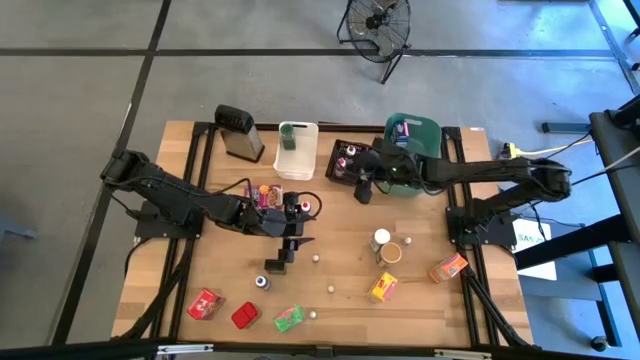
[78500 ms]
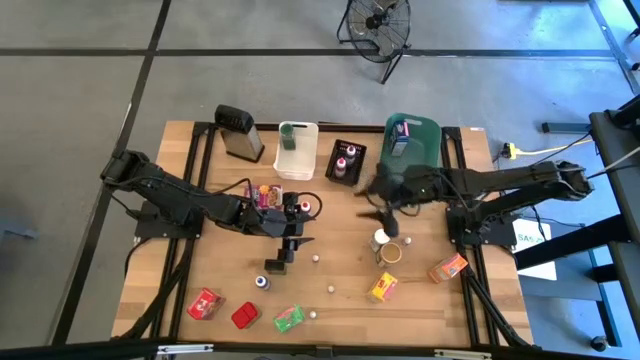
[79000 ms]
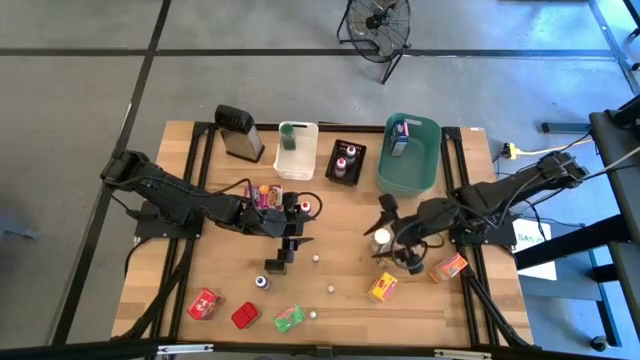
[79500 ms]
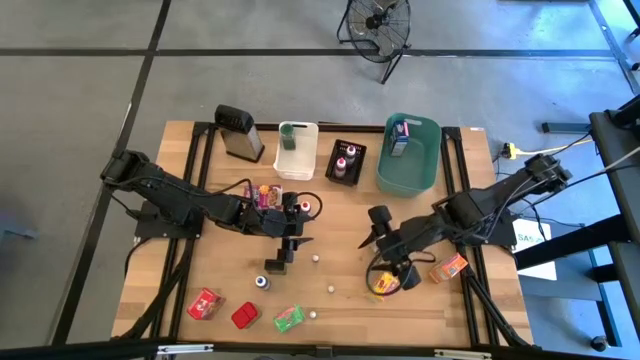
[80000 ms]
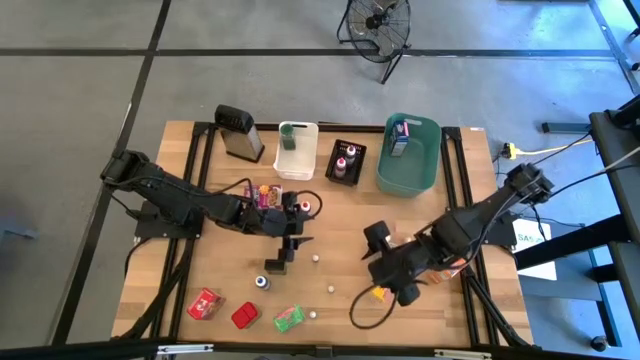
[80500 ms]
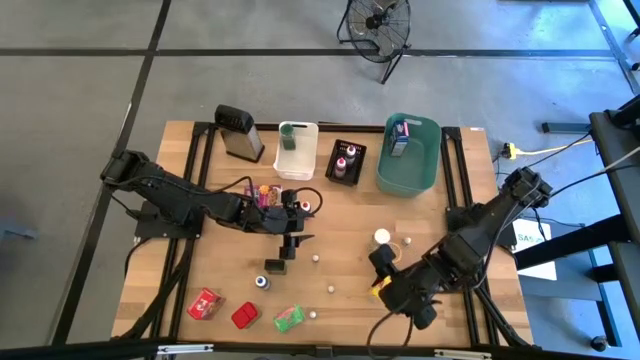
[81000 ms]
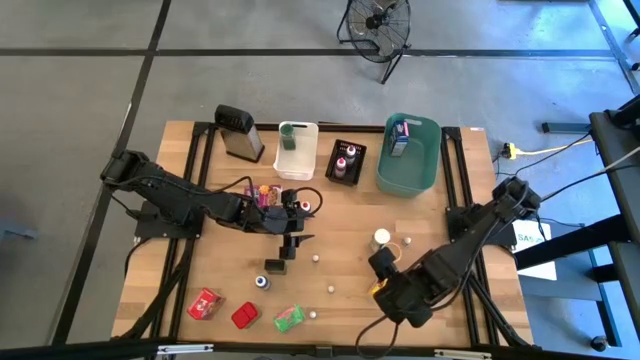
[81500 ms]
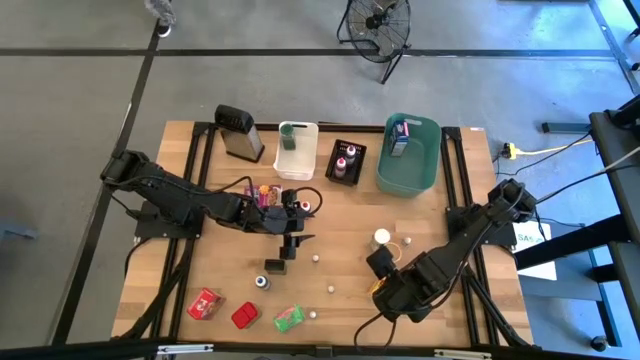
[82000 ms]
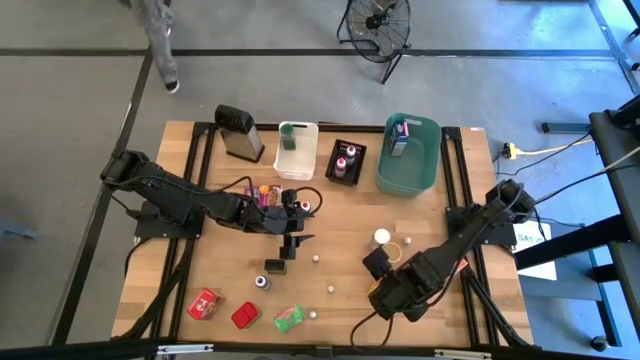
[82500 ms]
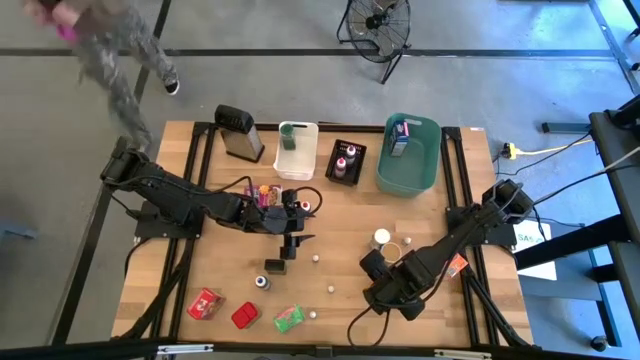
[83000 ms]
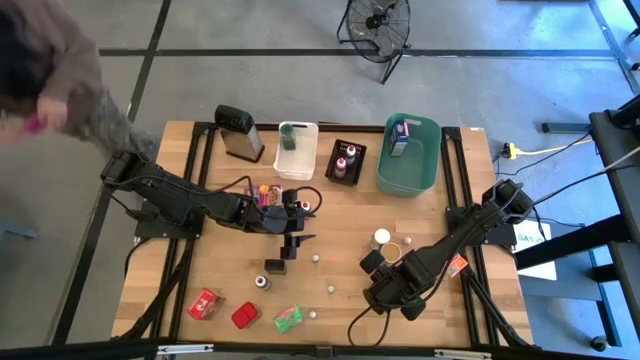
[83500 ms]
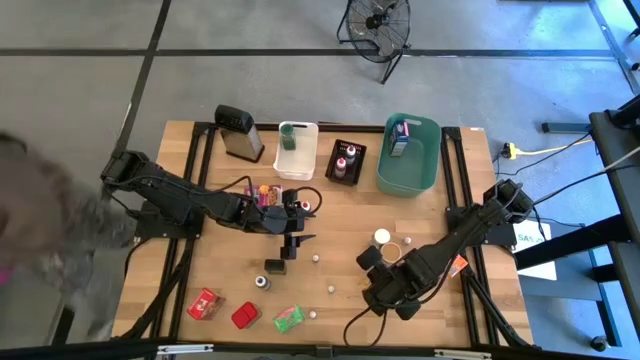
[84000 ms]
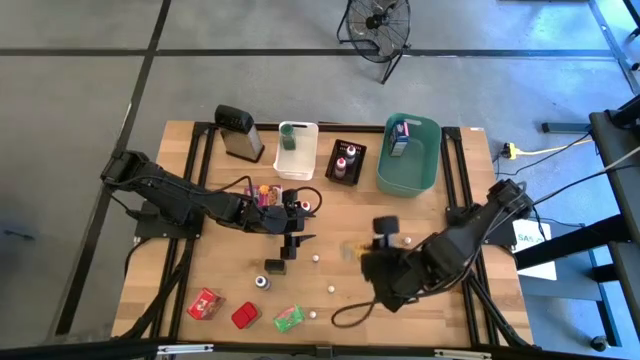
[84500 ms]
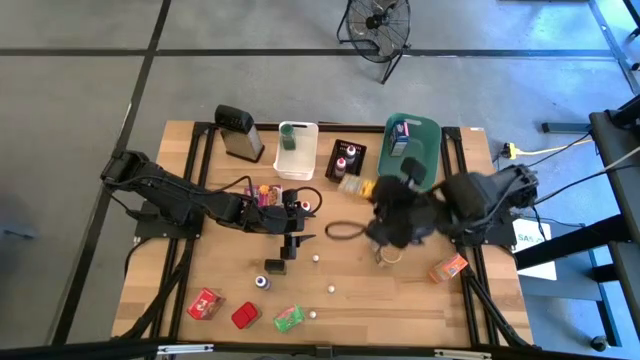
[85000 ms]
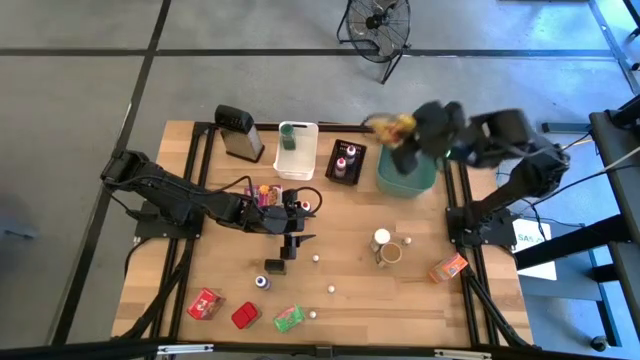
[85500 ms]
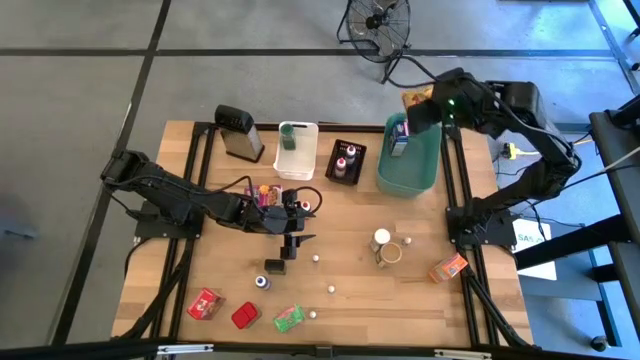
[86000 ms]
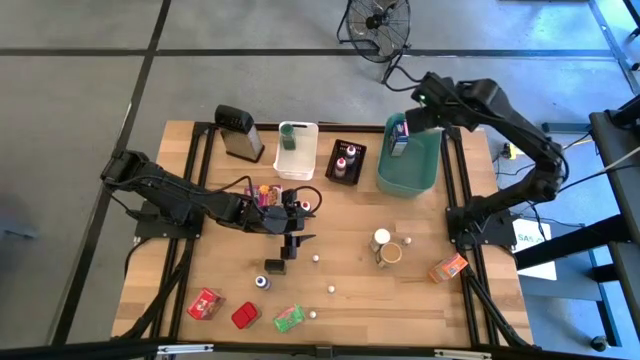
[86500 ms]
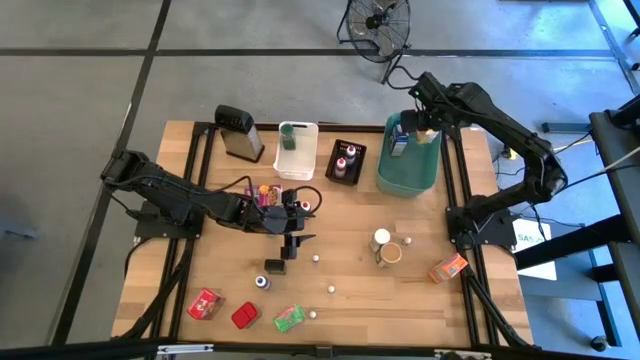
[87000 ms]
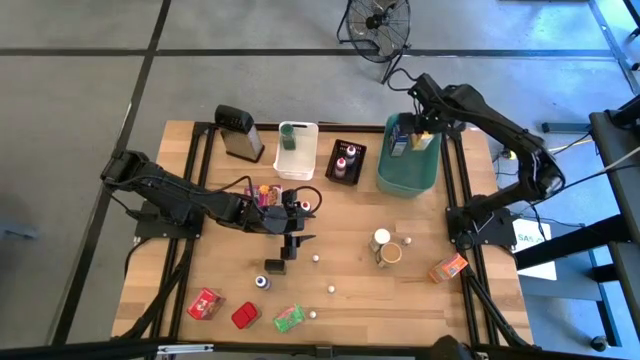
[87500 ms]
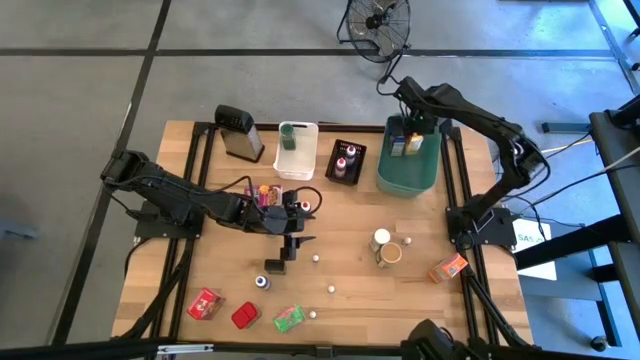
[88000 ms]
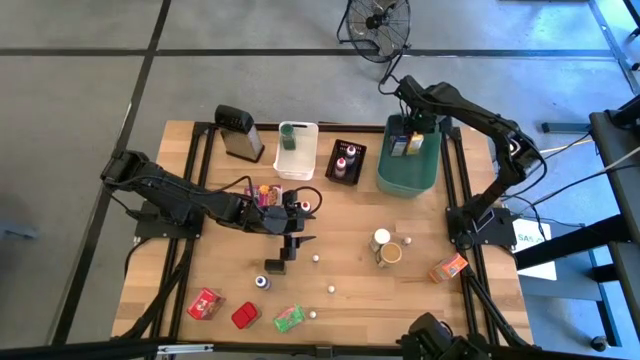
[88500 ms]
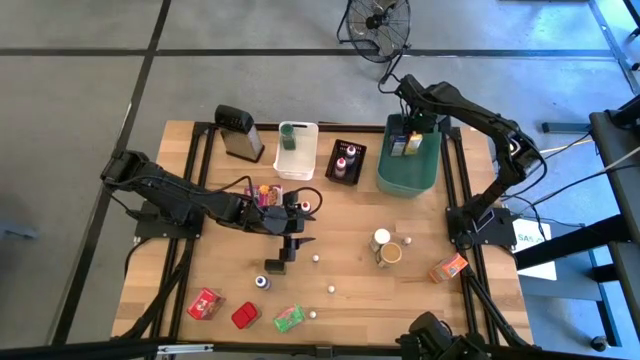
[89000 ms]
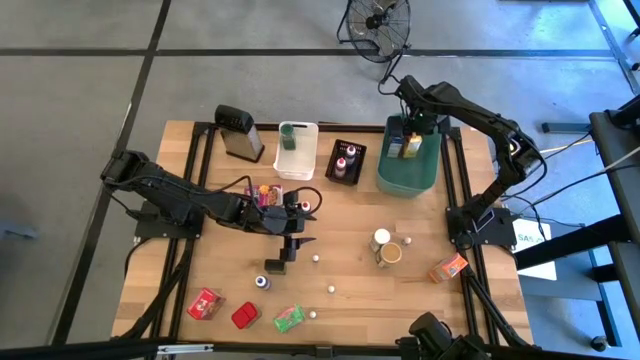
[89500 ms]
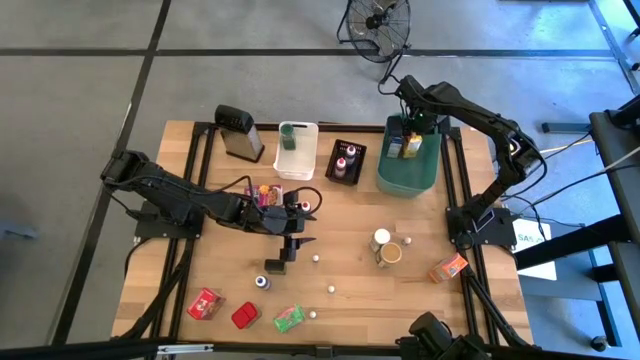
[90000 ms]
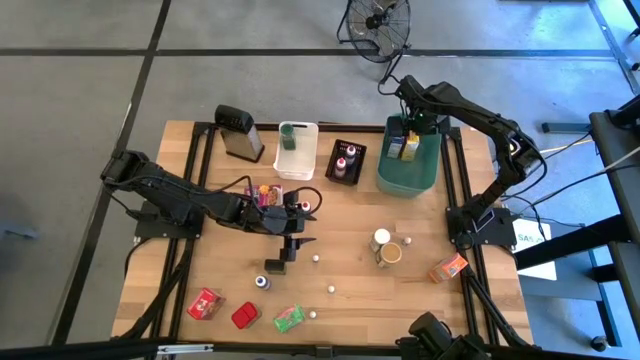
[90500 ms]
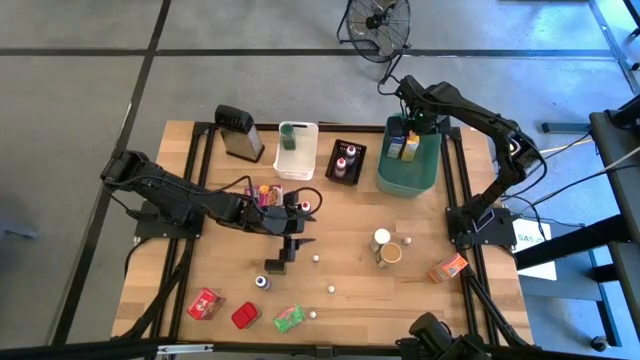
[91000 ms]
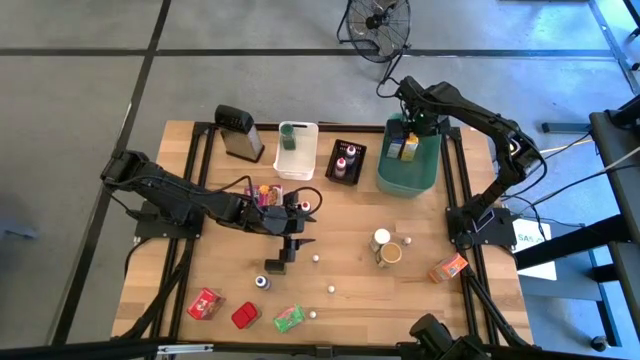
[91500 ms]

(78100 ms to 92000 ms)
Task: Pick & Place Kitchen Items
Put the yellow cereal box into the green bin

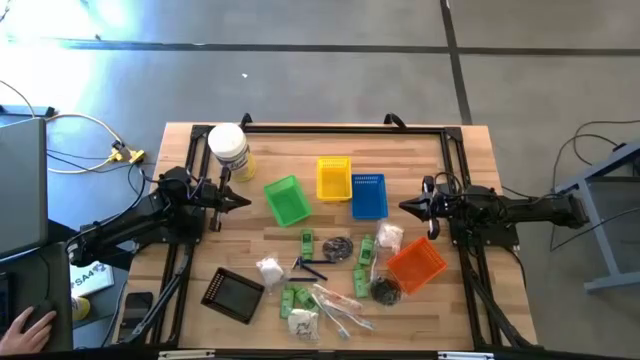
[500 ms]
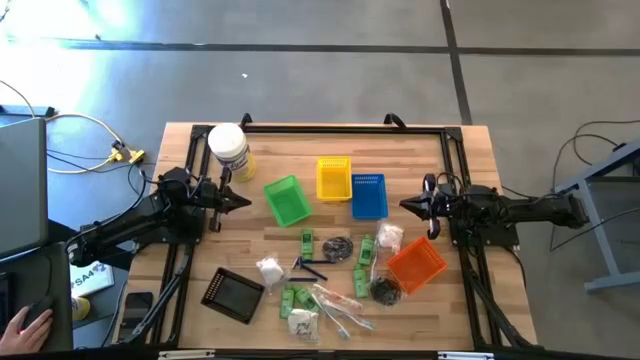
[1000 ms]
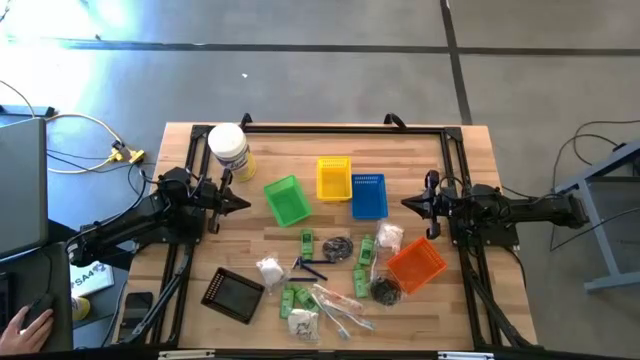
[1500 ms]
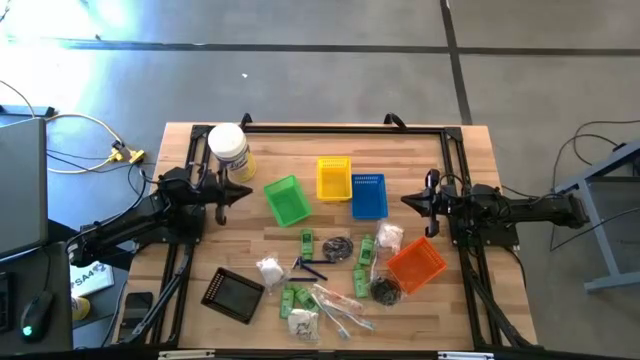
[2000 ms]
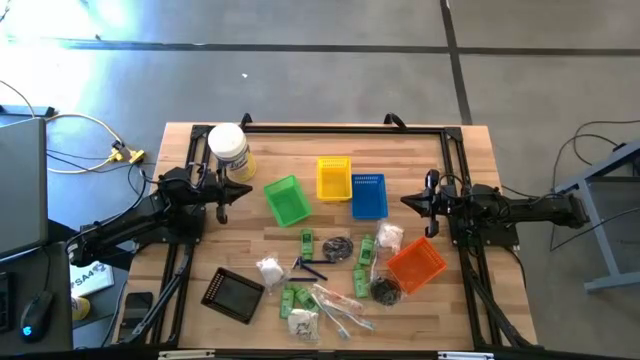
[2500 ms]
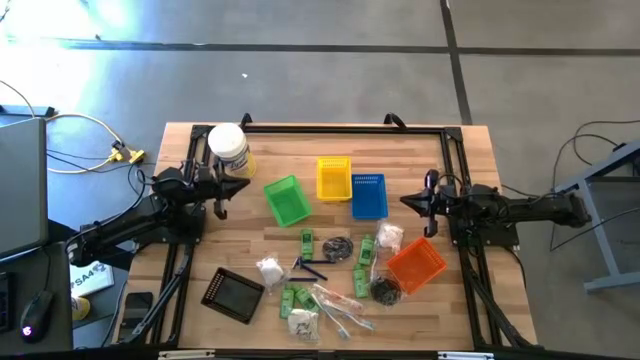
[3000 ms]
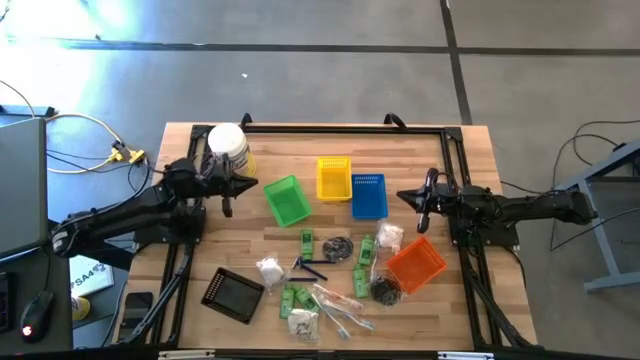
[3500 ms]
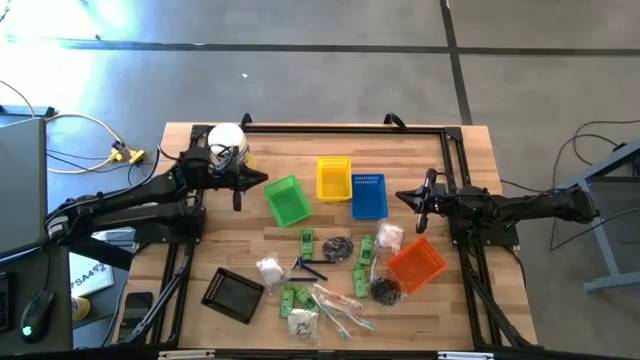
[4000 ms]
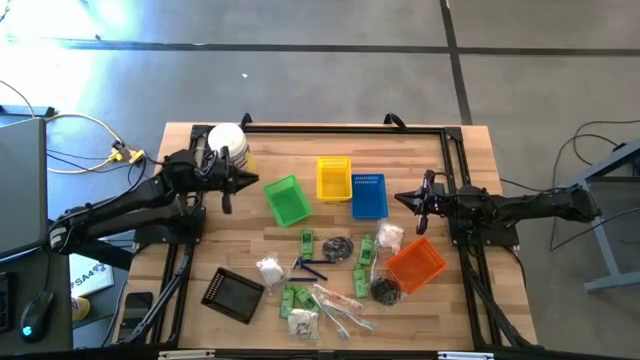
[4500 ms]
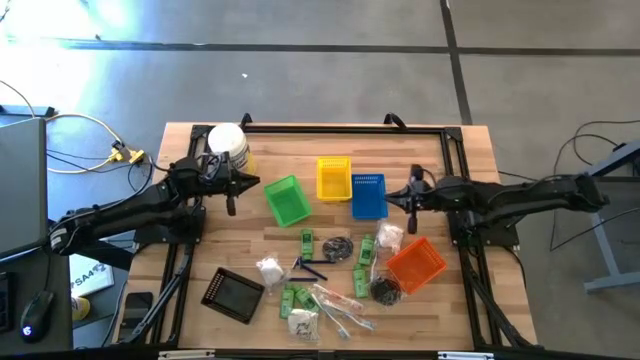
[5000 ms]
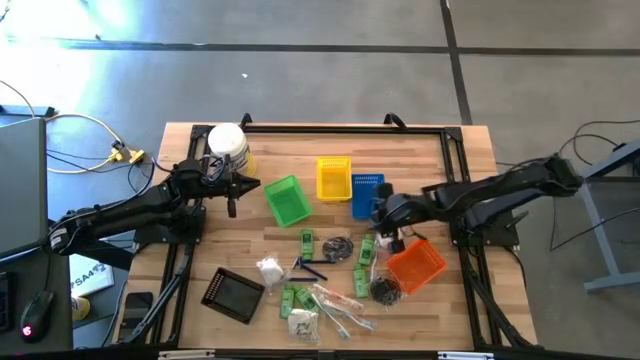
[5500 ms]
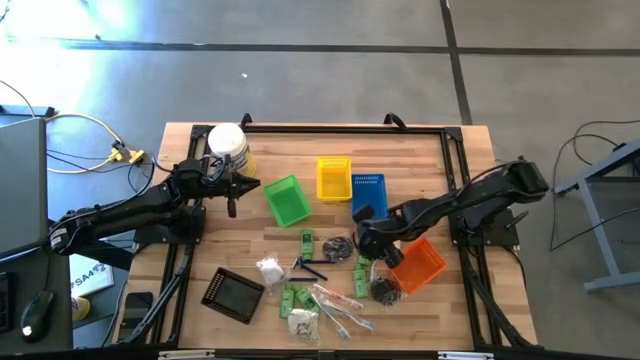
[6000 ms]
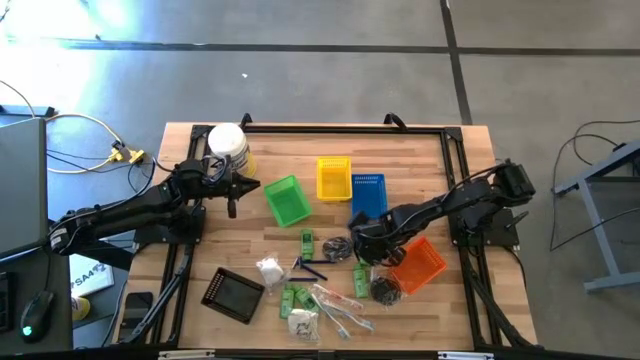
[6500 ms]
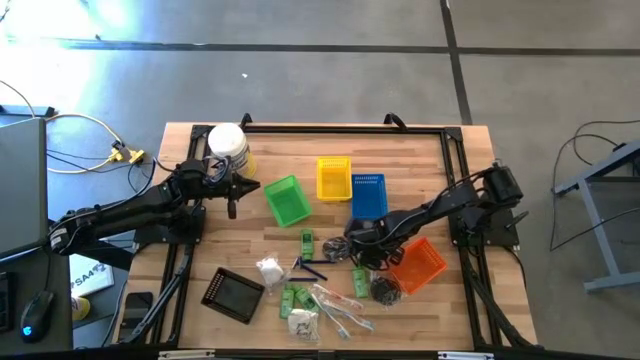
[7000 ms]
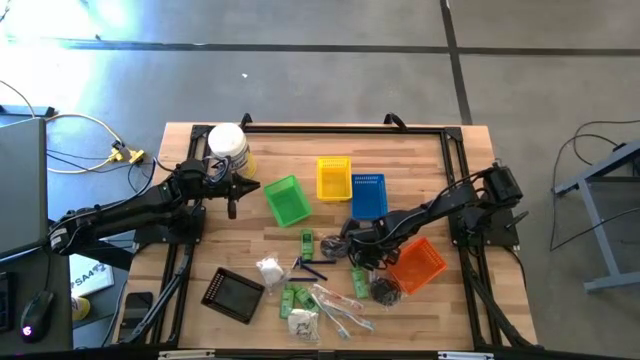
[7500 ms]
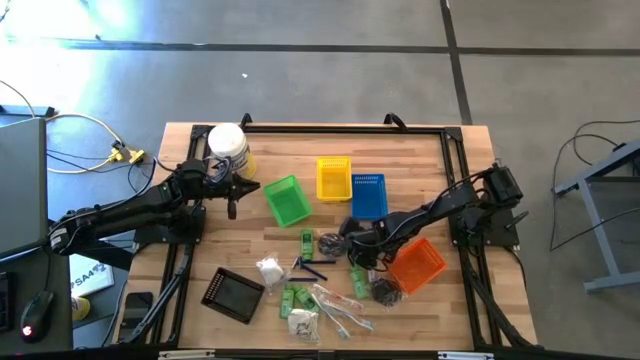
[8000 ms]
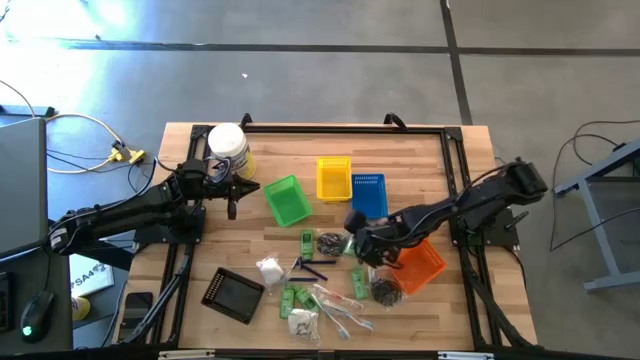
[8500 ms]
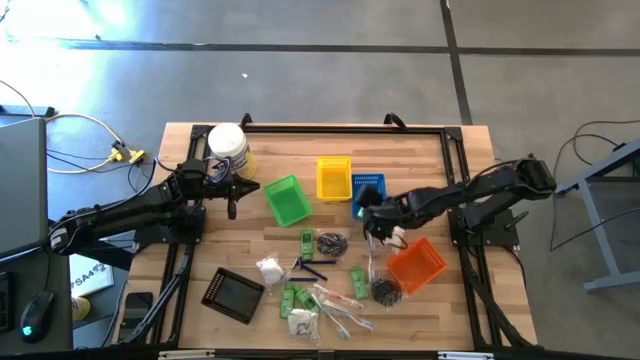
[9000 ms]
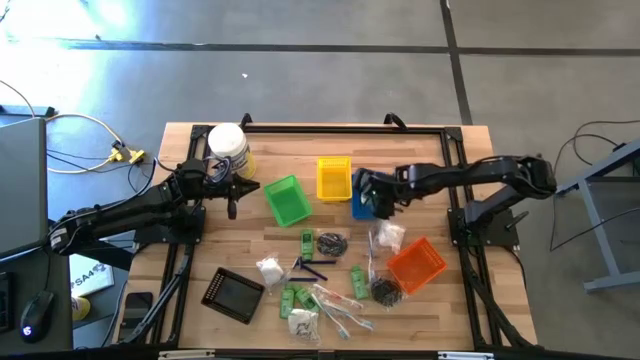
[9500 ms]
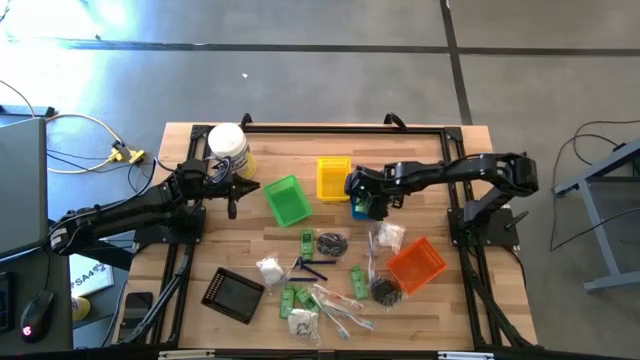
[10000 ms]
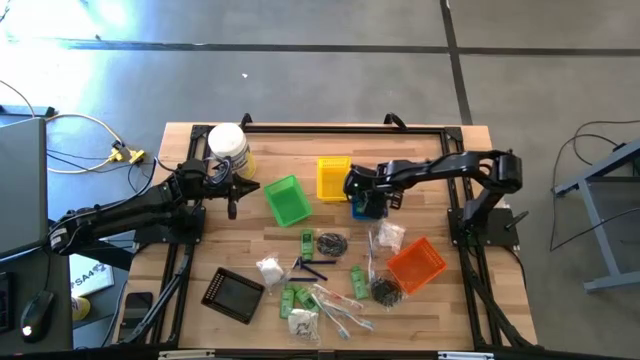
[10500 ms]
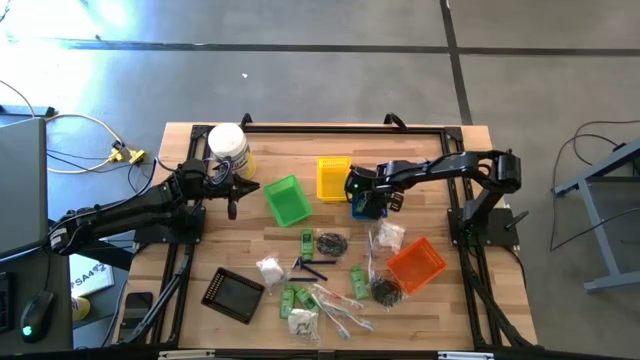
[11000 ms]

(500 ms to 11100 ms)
Task: Pick & Place Travel size toiletries
Put the green shampoo into the blue basket
